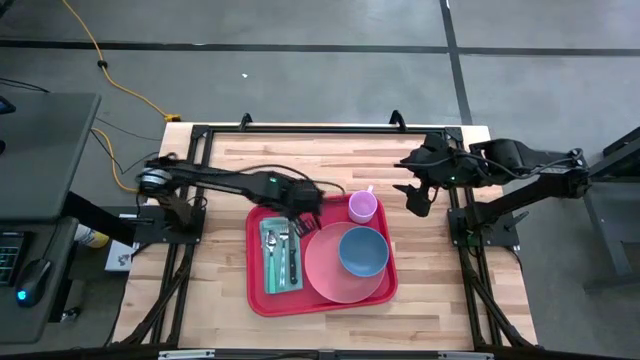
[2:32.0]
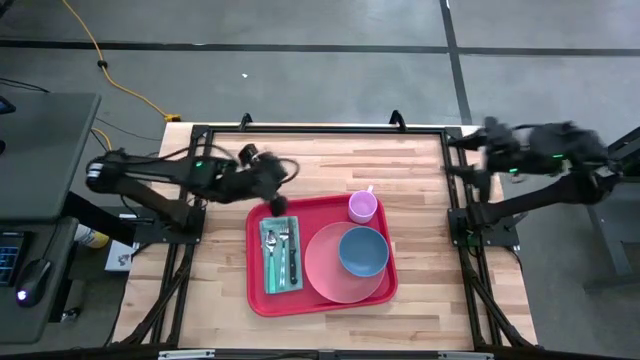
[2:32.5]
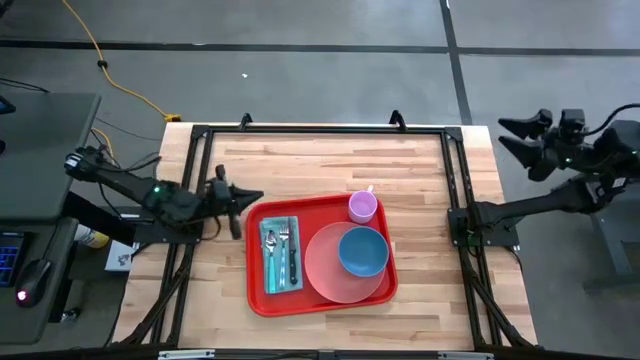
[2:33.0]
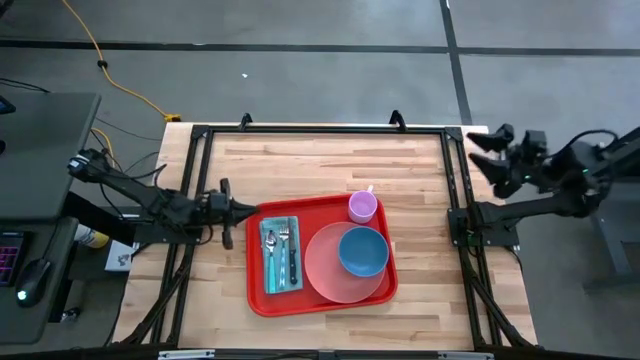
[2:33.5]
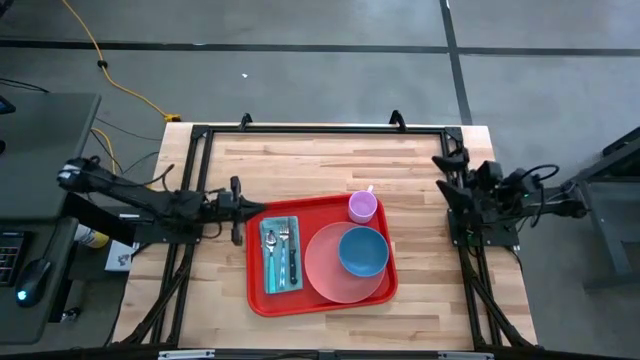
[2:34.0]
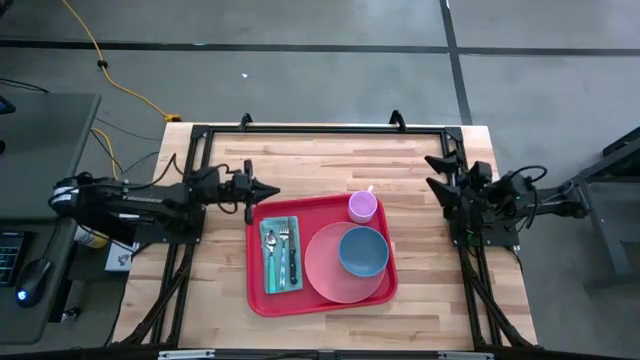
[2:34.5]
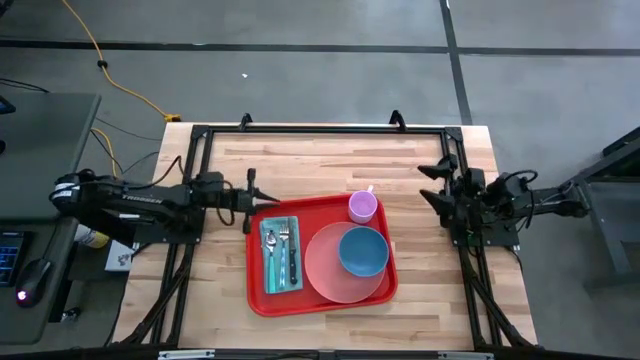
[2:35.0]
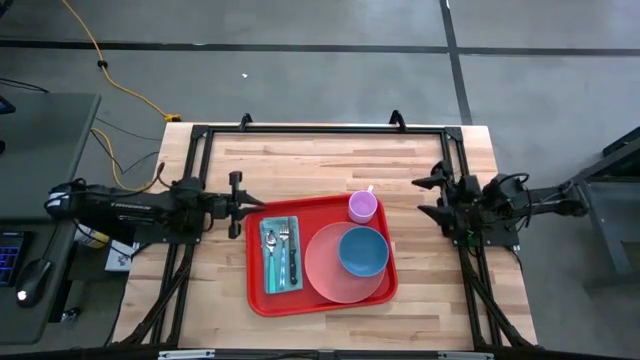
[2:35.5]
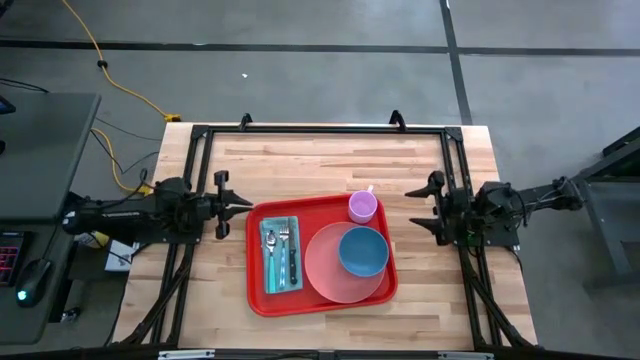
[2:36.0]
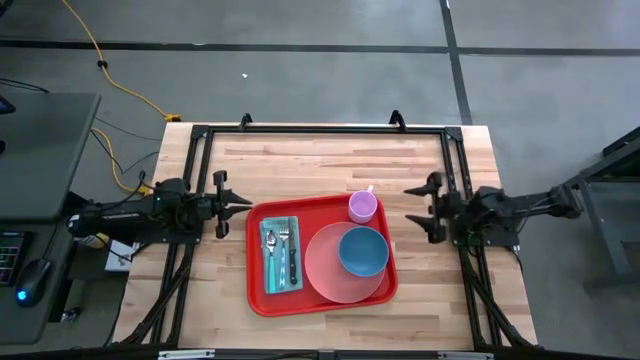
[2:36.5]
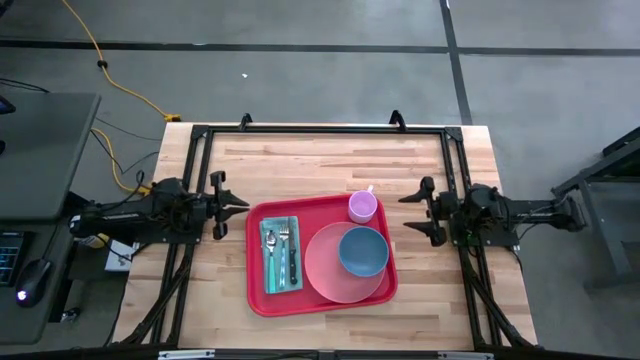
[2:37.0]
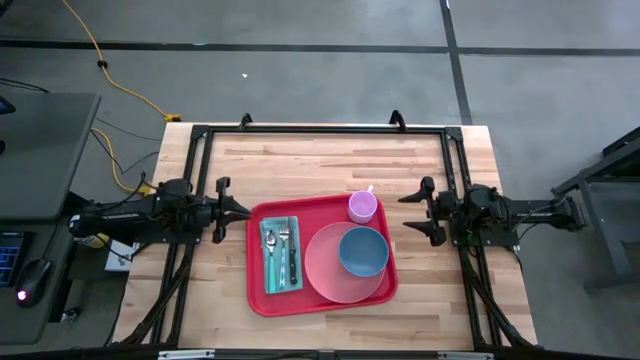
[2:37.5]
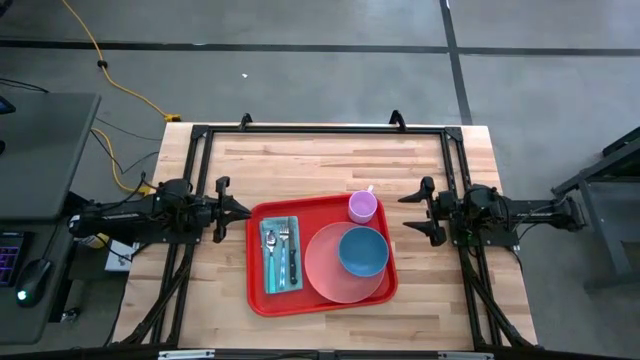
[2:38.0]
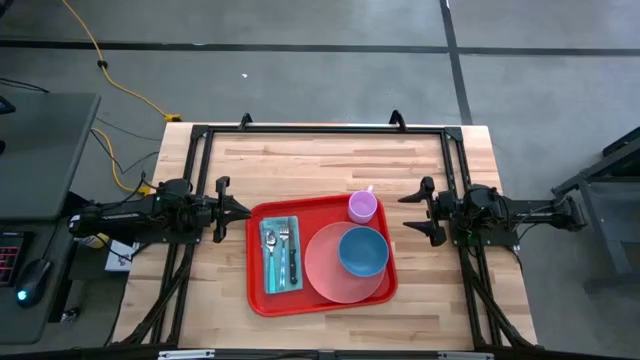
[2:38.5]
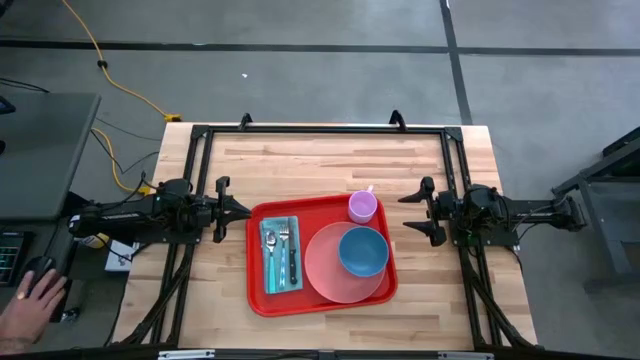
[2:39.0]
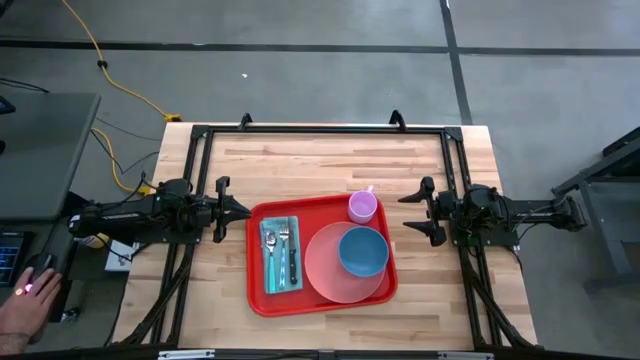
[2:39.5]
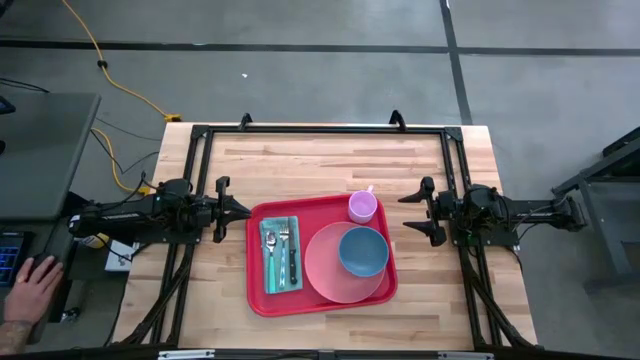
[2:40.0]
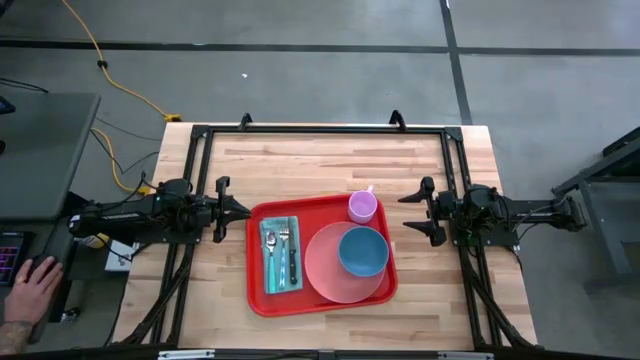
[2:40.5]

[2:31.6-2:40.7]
Task: Set up tray
Return to Home Position

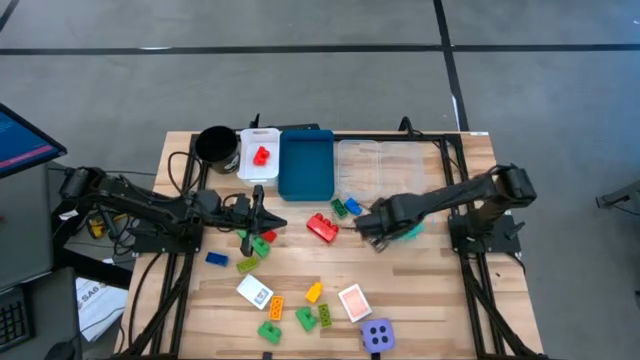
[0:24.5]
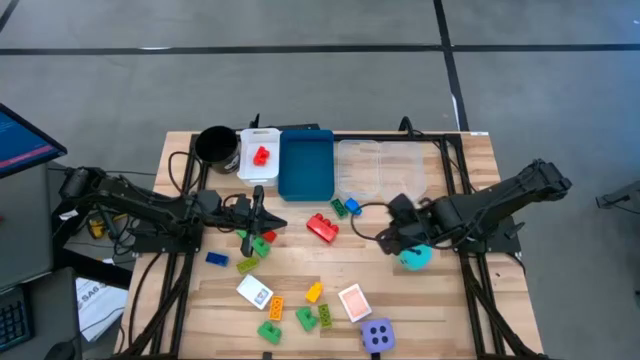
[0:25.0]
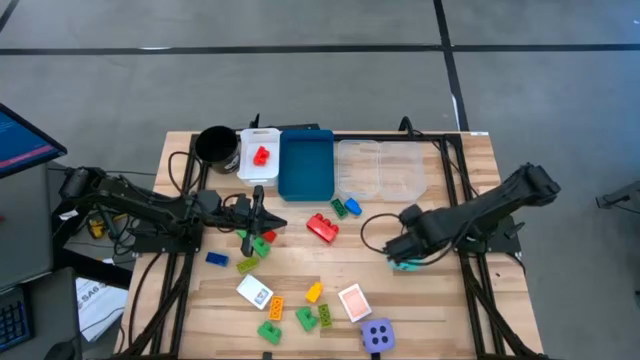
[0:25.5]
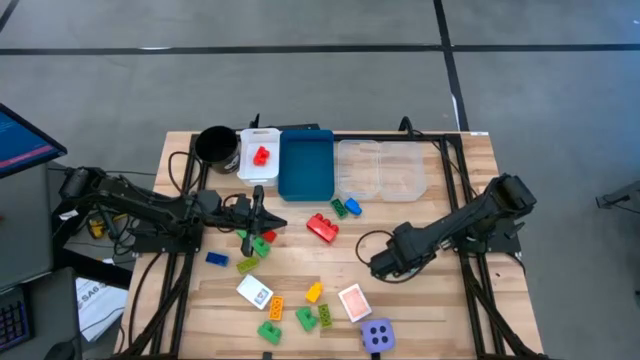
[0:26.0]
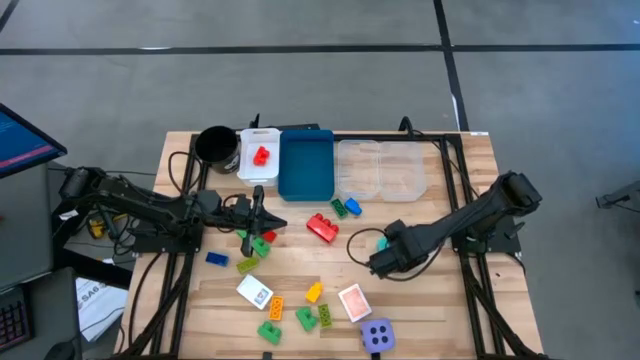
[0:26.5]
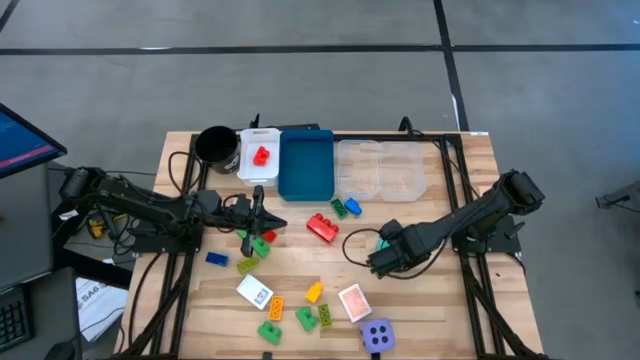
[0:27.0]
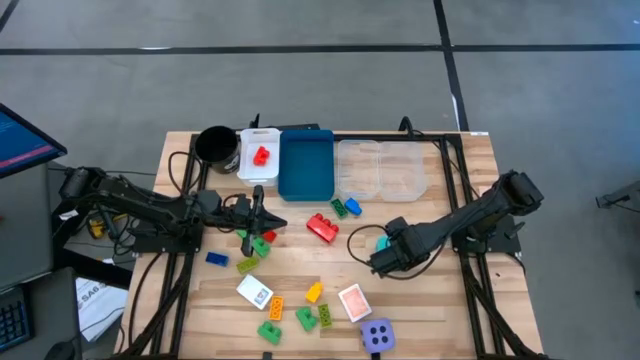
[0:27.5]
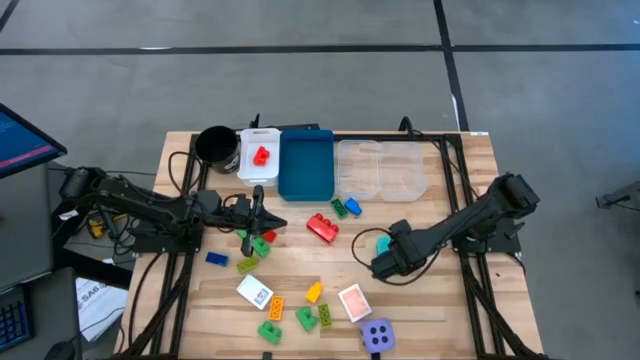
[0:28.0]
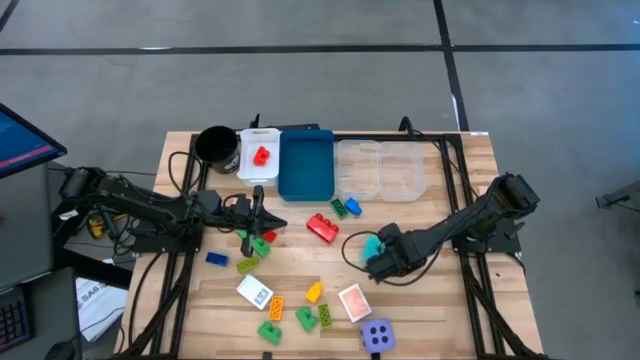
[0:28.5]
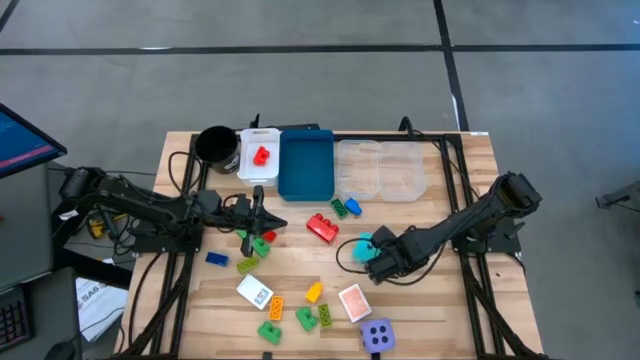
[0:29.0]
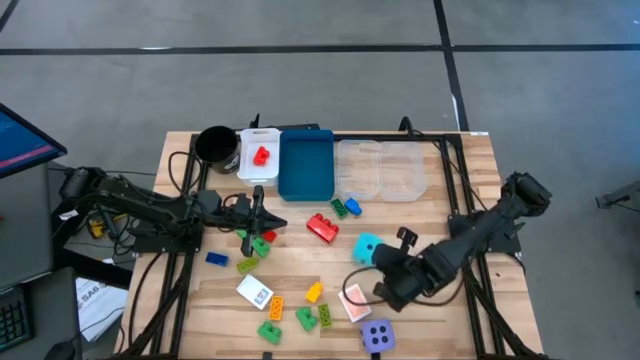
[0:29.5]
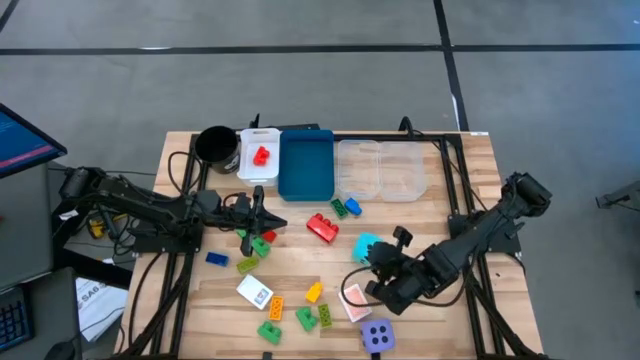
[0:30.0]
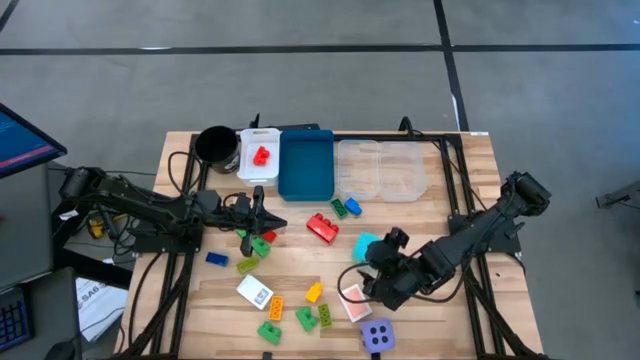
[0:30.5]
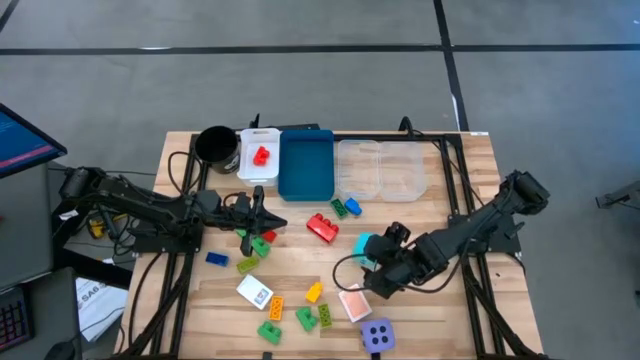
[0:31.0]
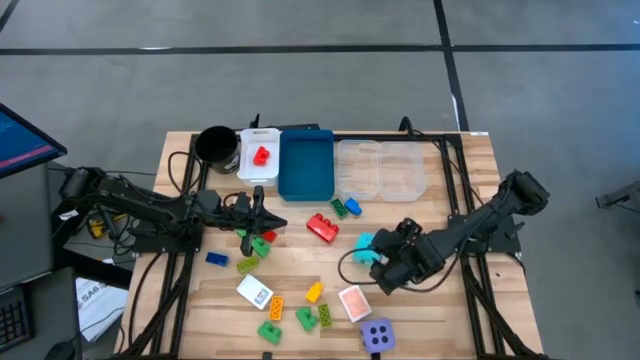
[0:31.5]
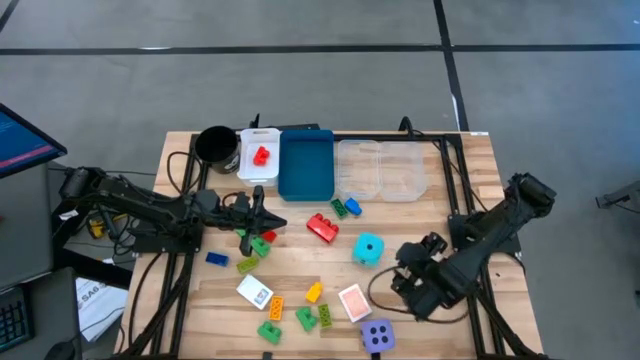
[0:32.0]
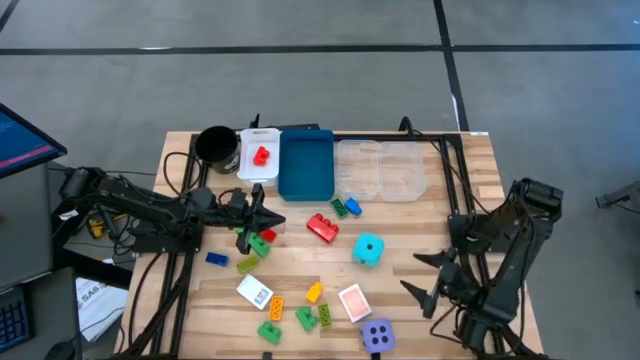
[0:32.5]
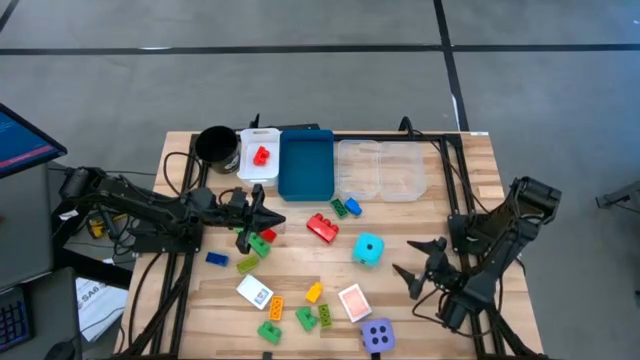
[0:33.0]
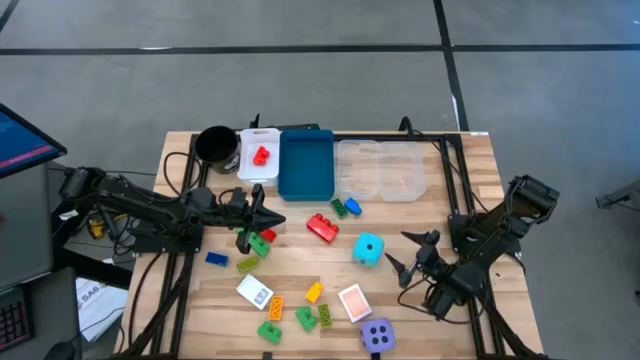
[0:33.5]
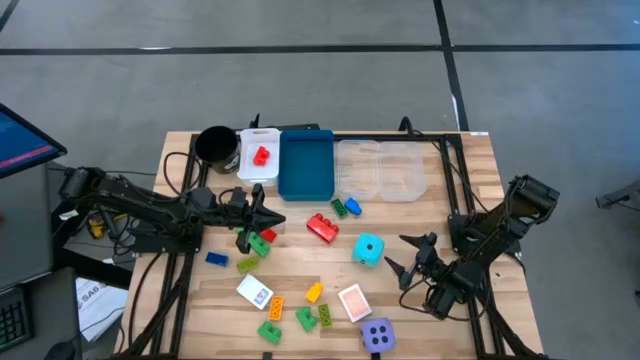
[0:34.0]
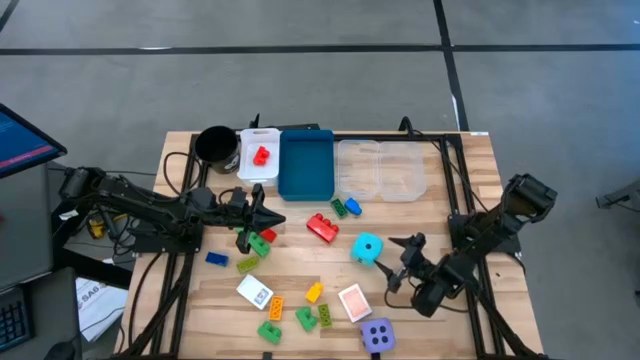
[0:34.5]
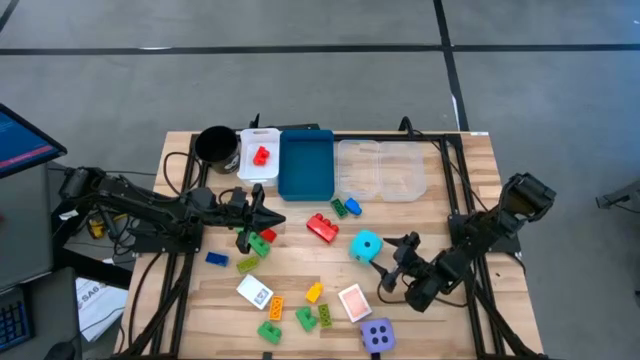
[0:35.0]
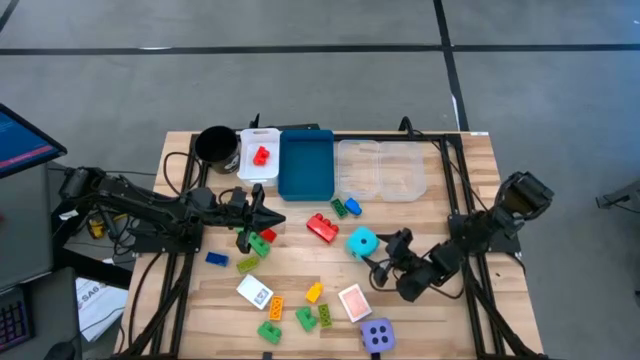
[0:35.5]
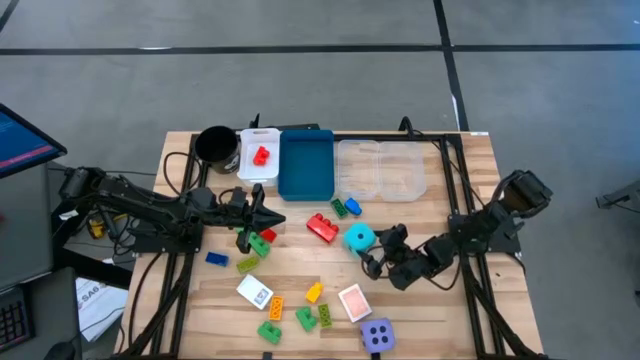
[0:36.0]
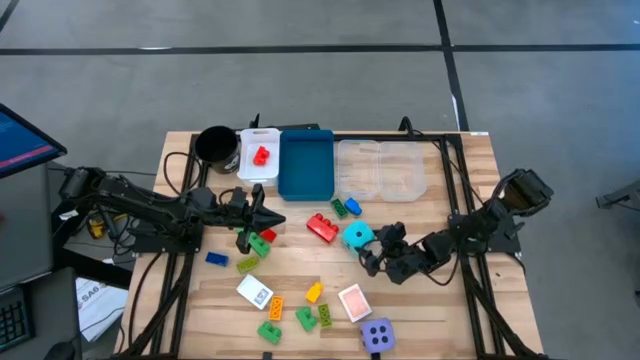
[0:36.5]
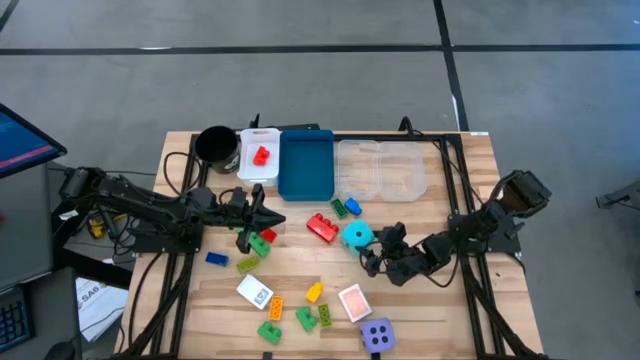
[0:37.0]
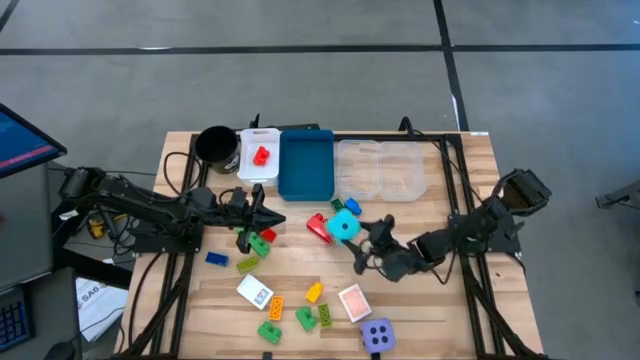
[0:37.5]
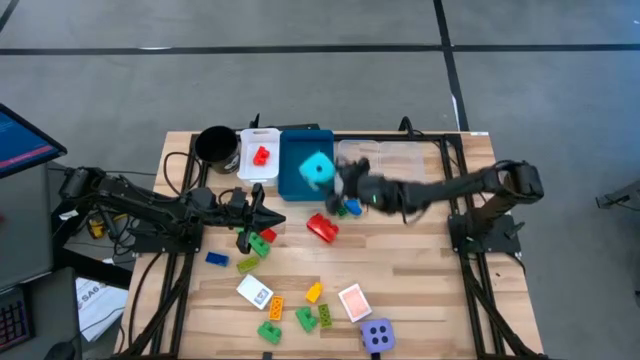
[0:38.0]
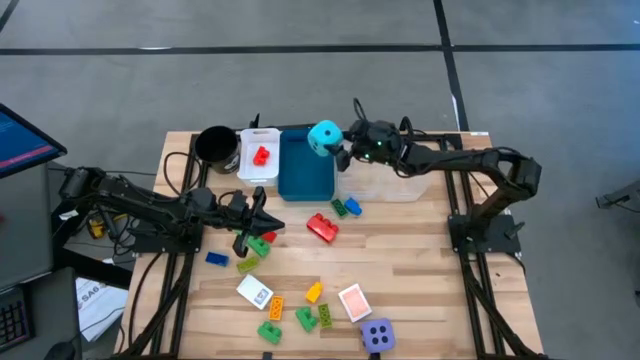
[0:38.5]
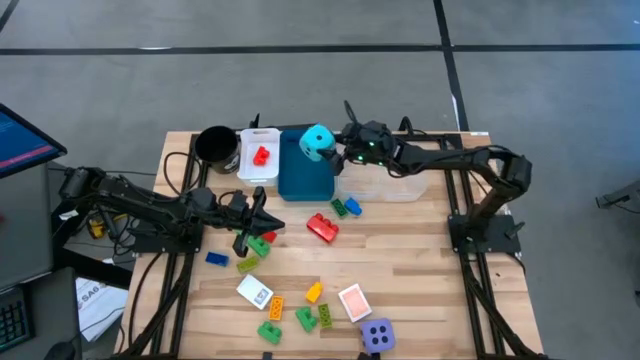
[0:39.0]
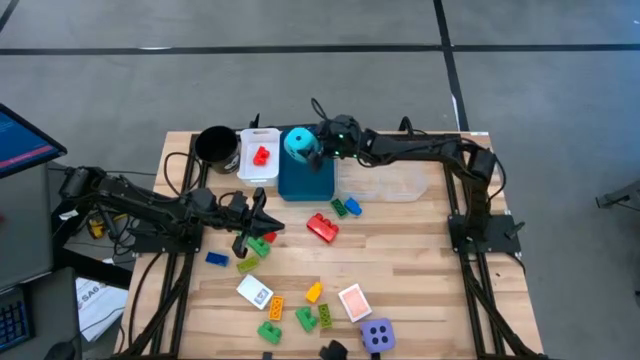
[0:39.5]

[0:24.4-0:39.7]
Task: Pick & Place Toys
Put the light blue dice into the blue bin
